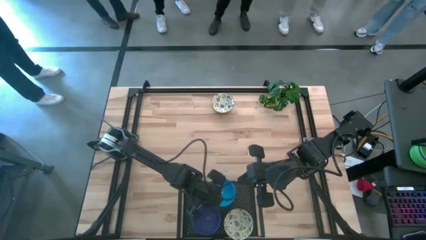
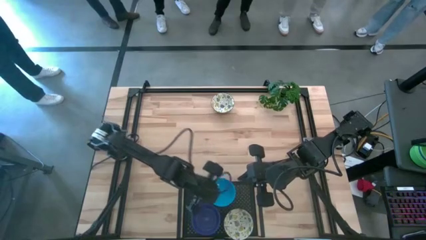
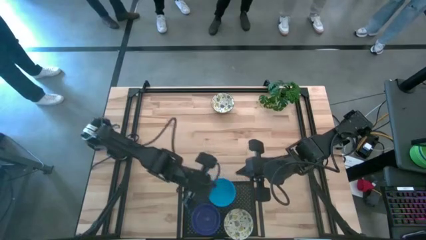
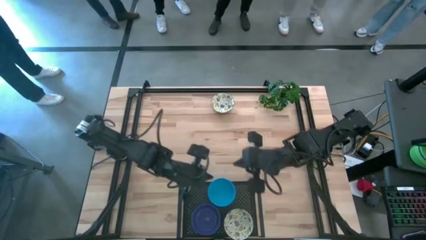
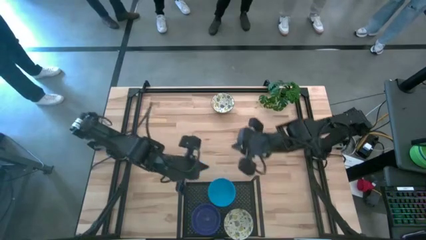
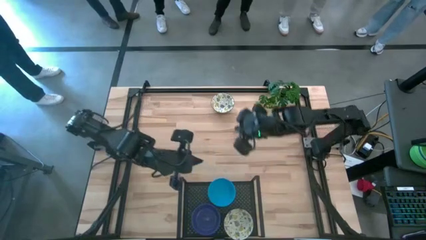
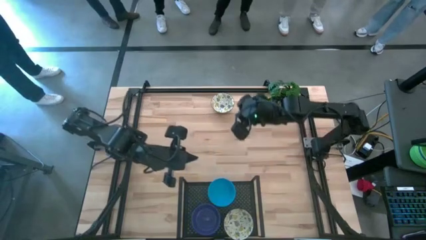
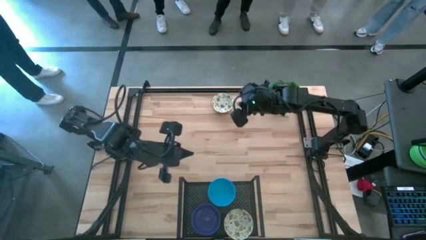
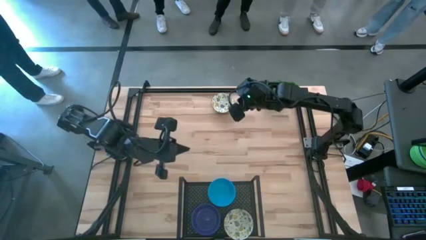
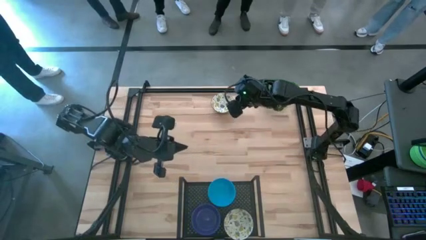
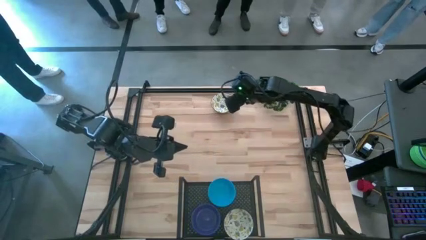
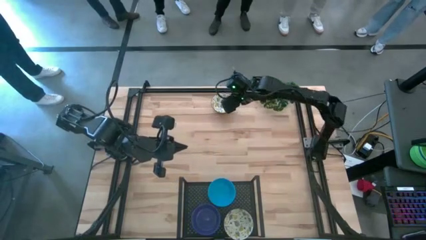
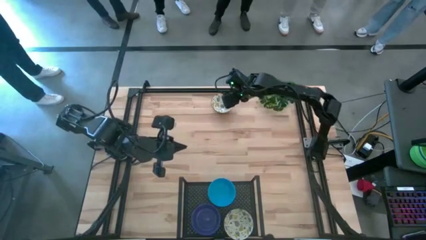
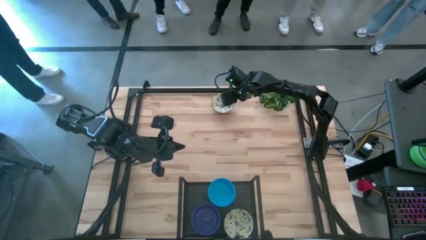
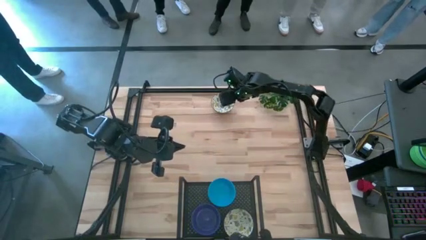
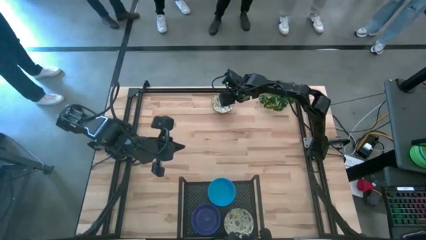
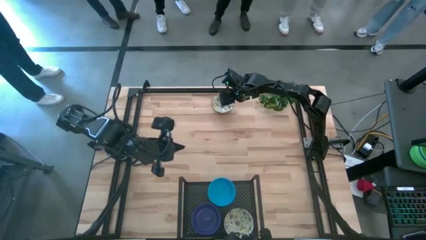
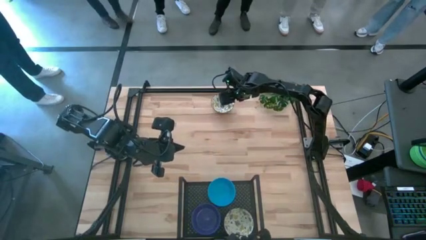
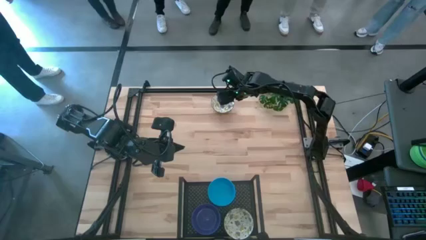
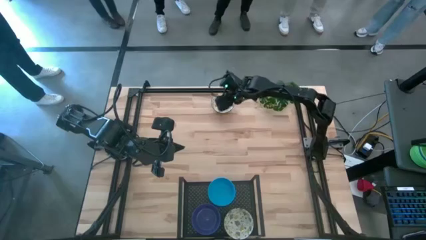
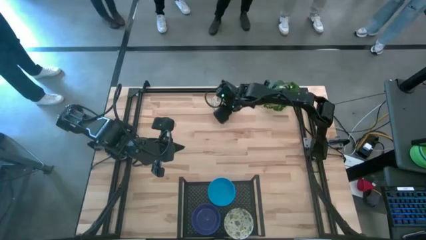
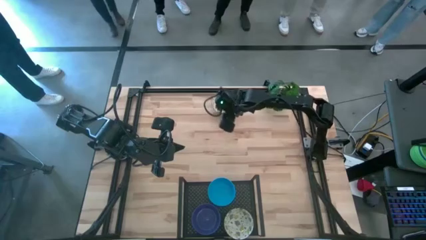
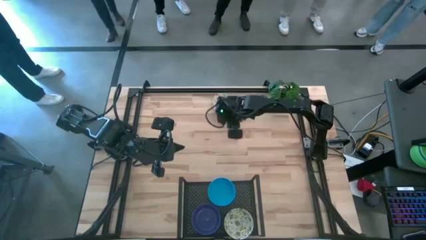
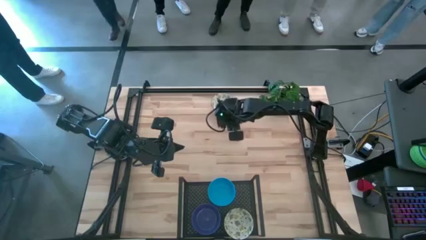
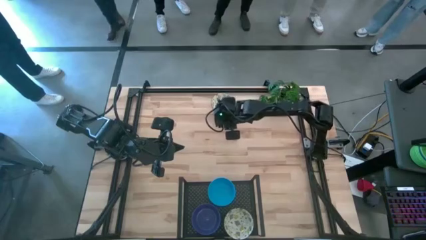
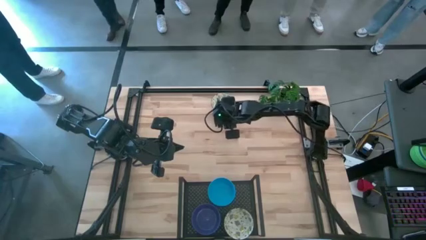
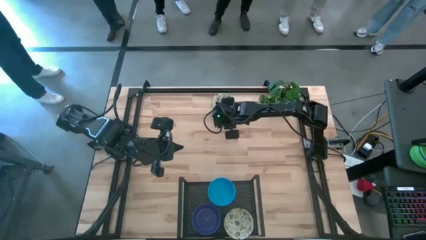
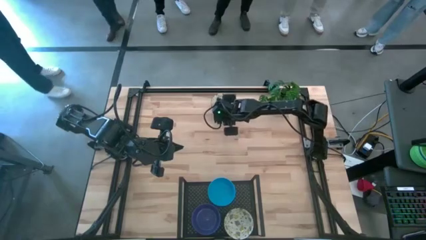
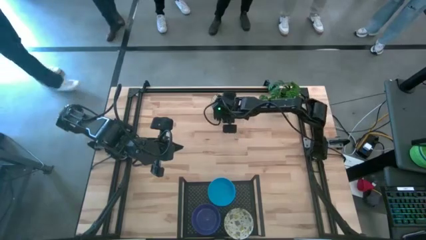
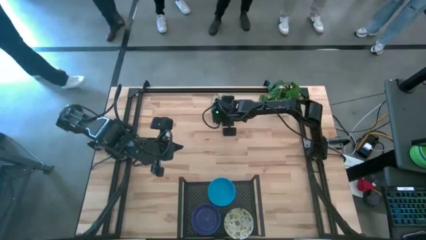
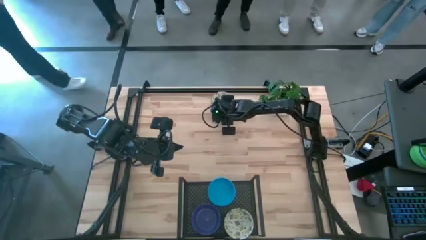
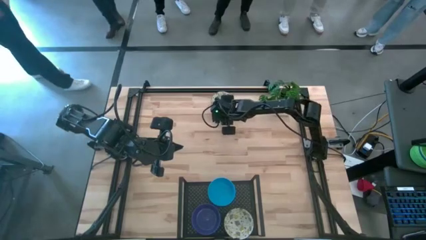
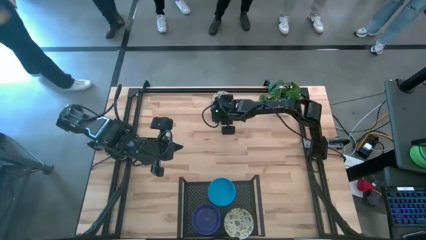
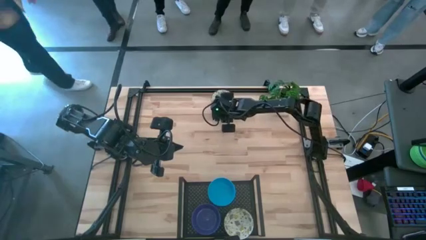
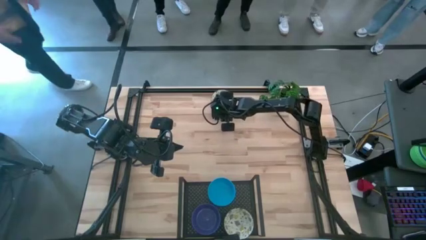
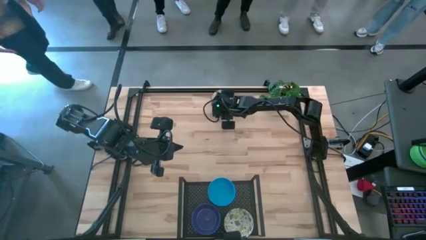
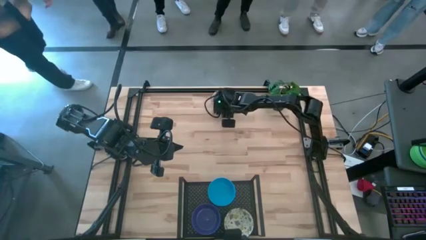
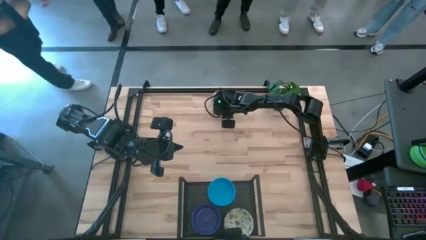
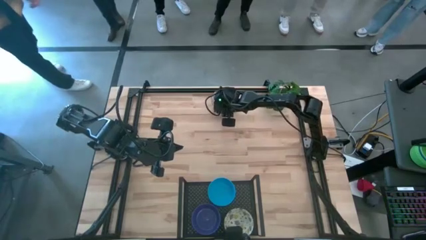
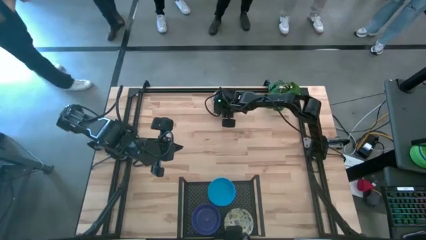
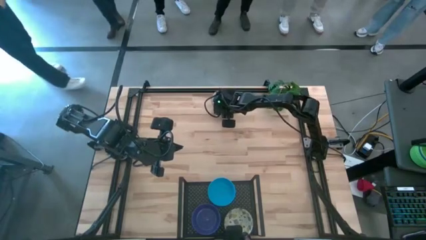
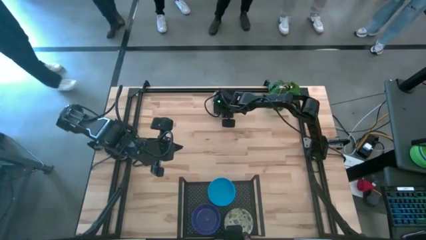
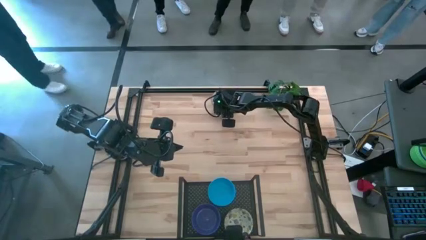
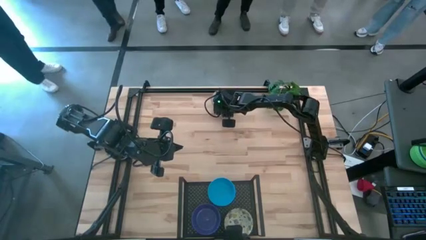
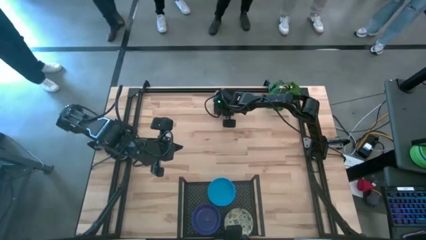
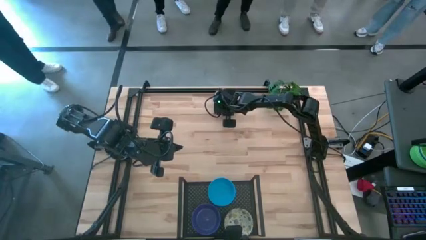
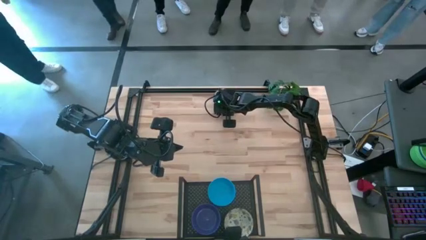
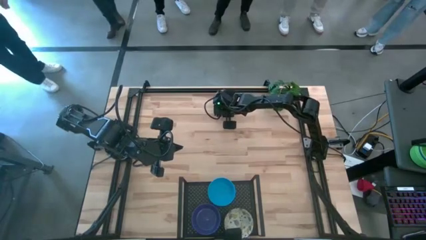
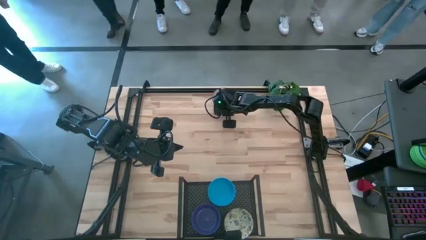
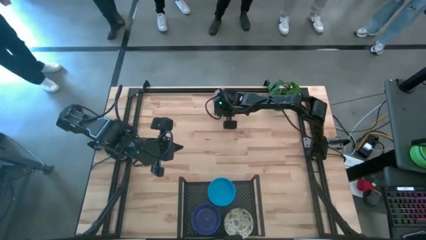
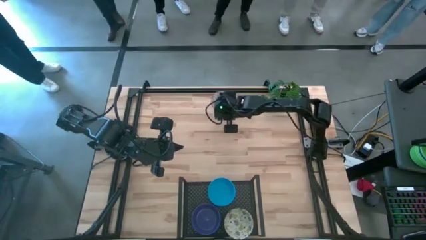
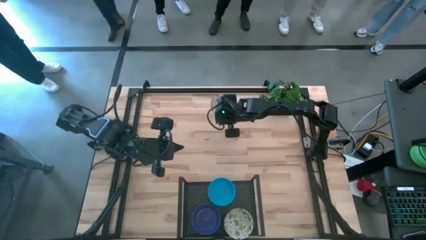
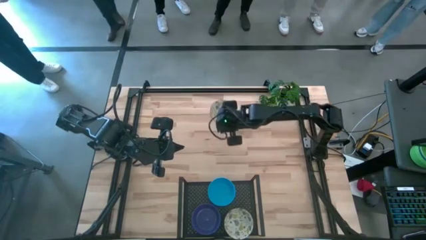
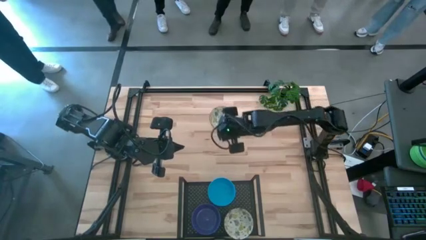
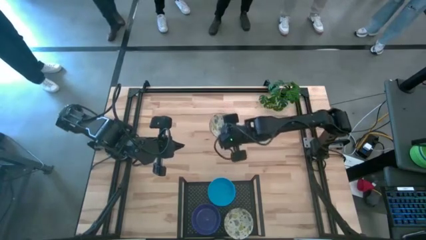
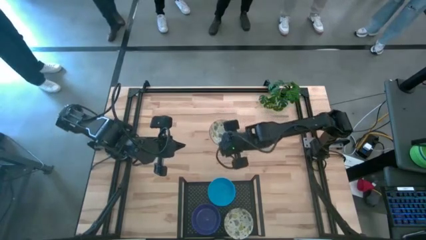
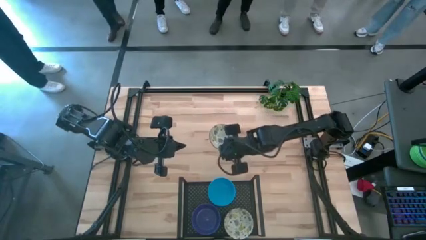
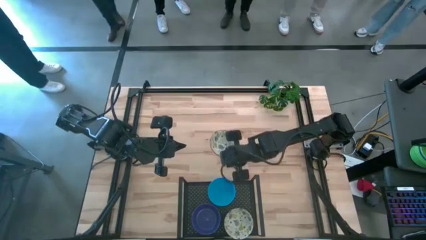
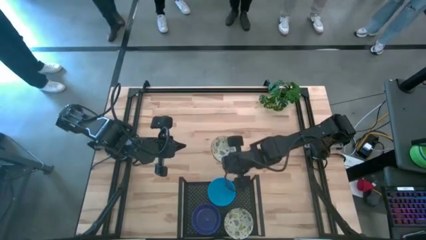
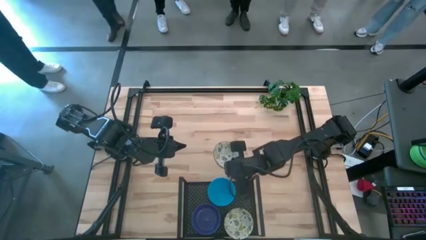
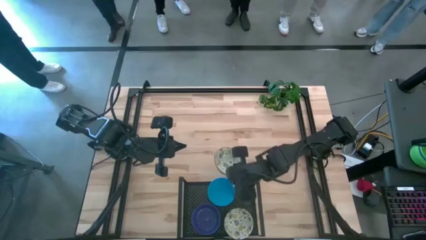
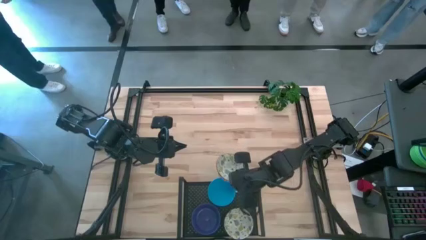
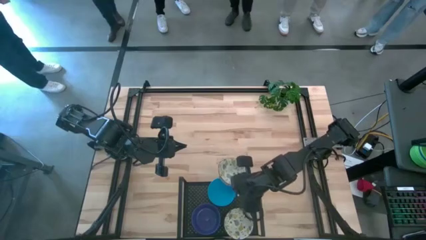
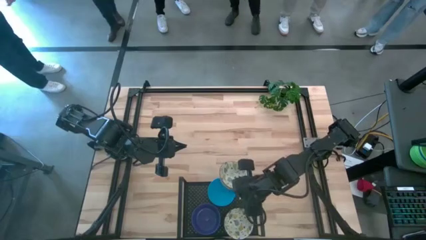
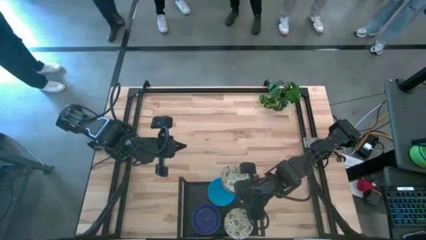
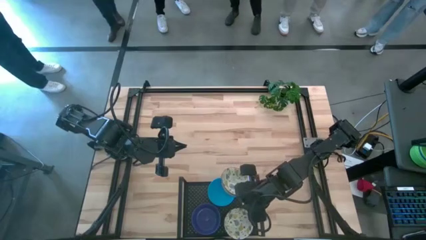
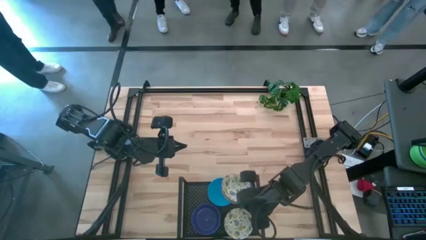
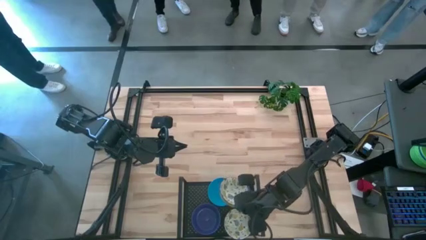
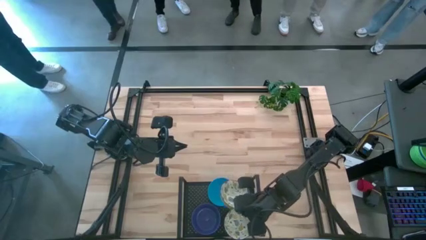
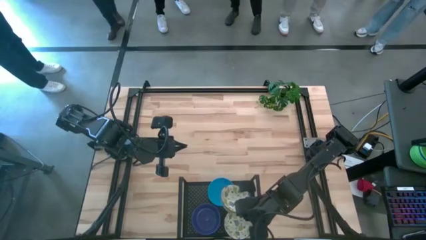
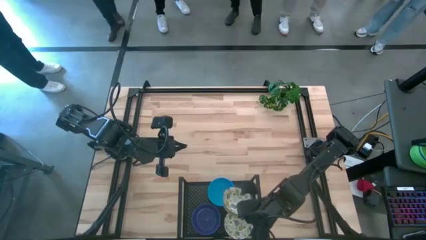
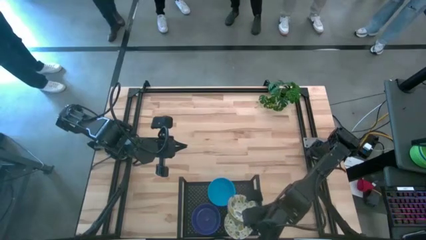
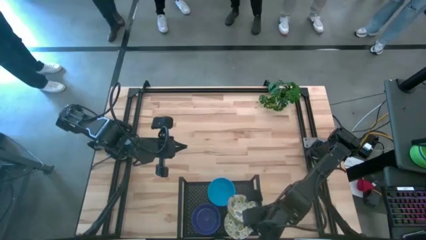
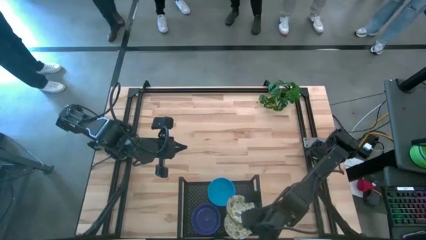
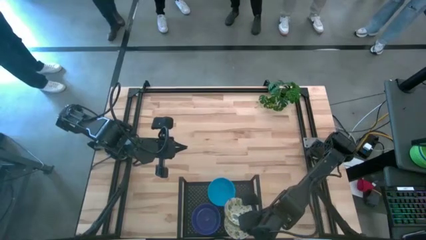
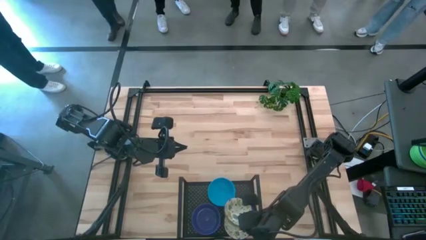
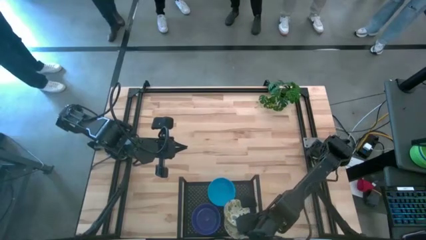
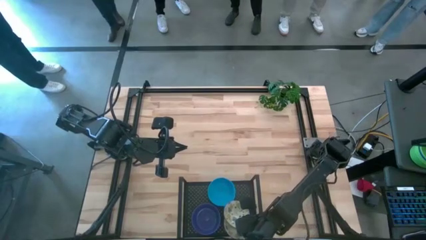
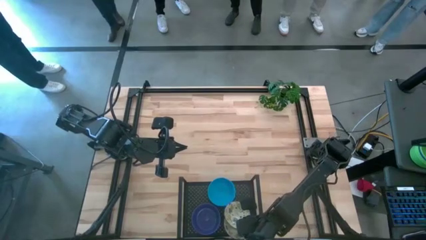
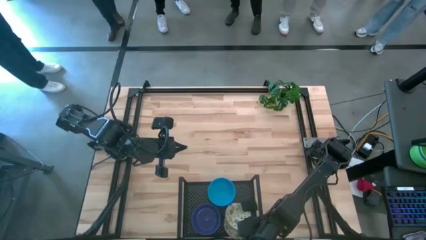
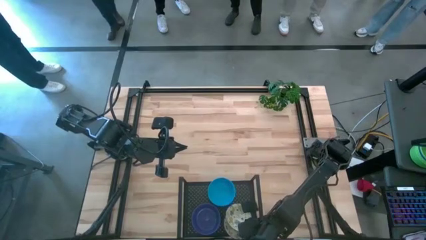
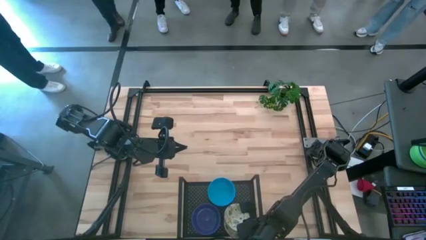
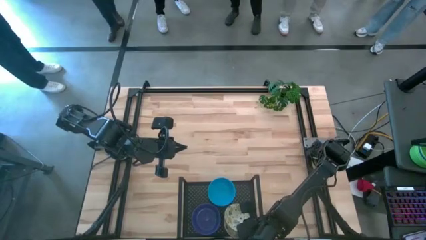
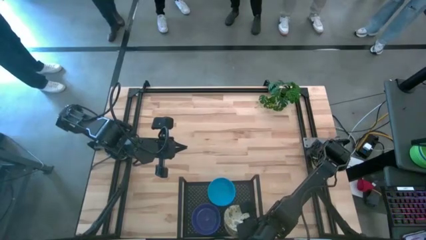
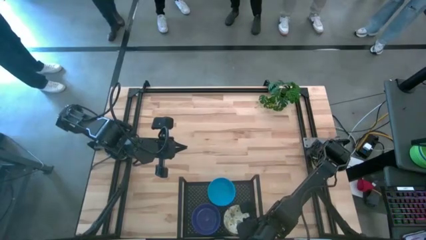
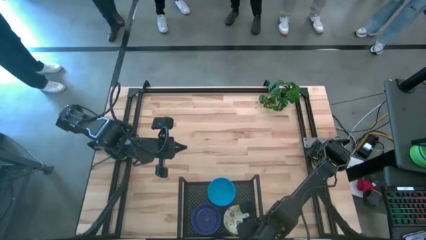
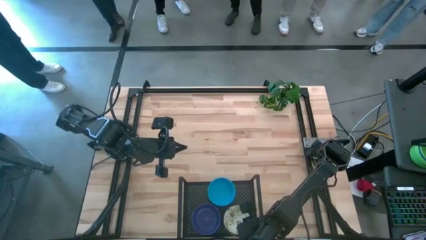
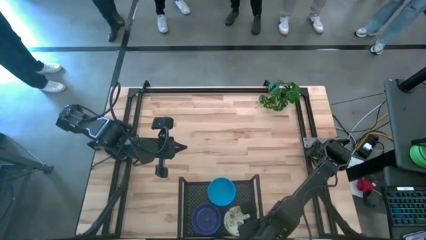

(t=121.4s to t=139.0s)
Task: Pick & Place Mini bowls
Stack the white patterned bowl on top of the white patterned bowls on the shelf
